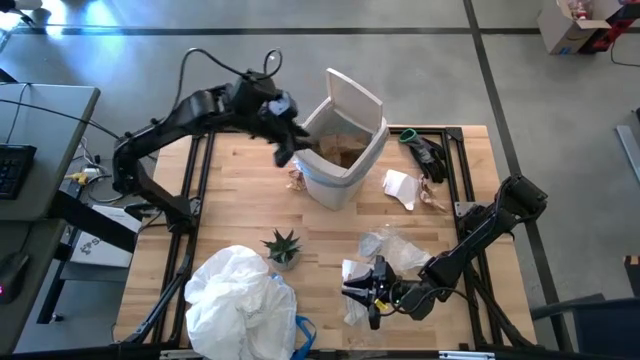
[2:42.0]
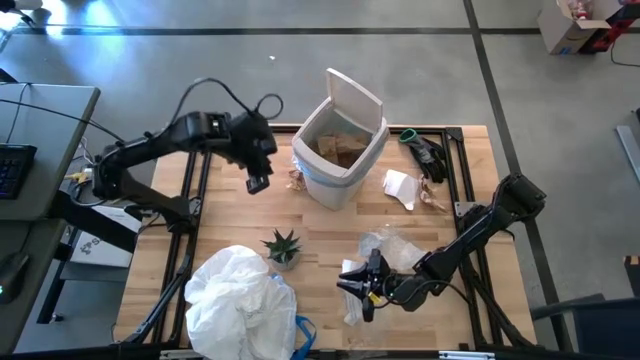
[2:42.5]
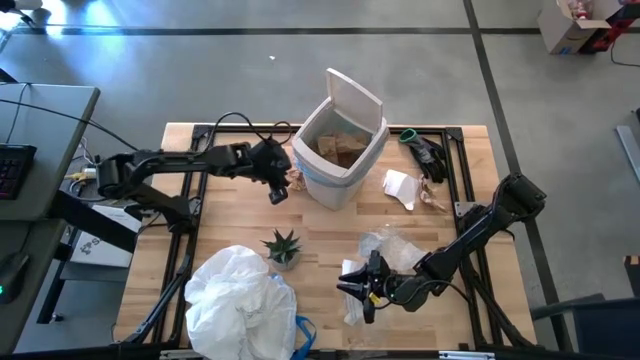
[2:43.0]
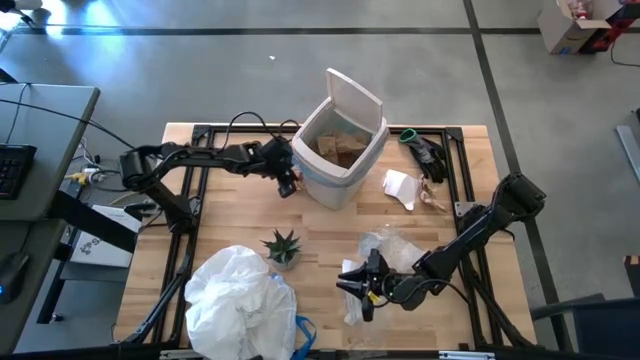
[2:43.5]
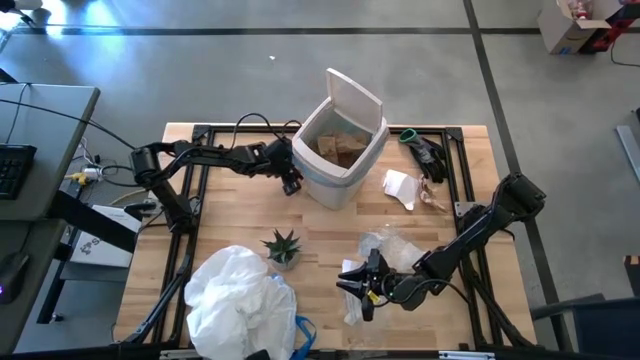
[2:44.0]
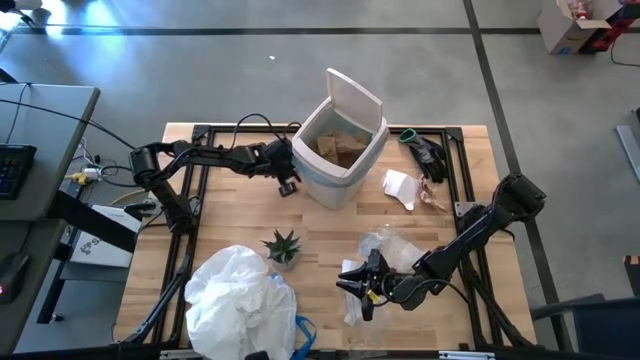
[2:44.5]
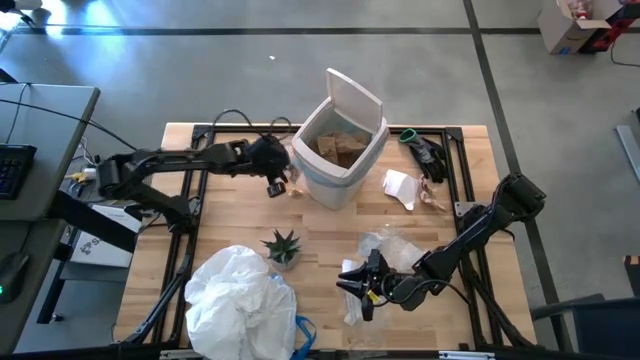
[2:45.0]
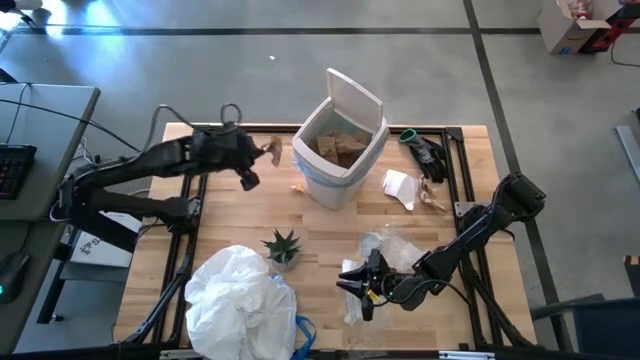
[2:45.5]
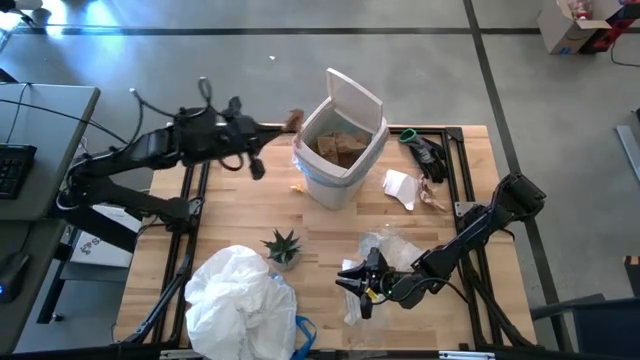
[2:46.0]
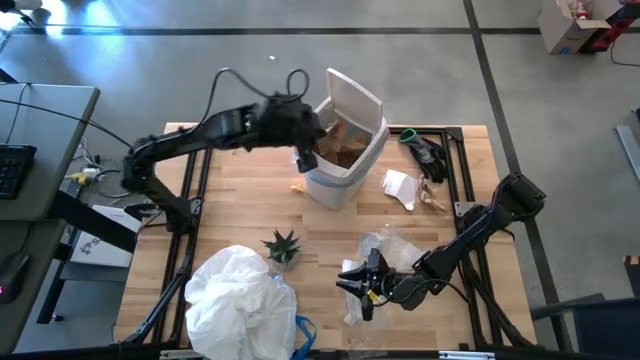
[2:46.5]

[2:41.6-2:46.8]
Task: place trash/remove bag and relplace
Put the brown napkin into the trash bin

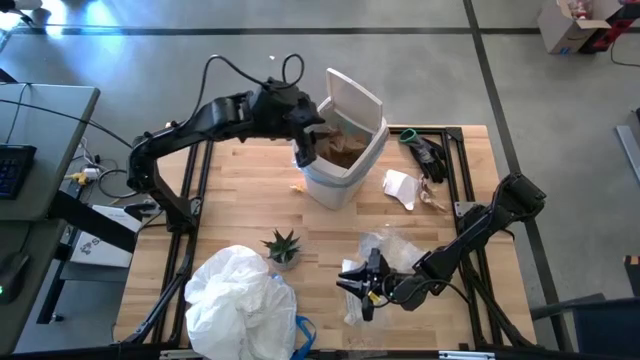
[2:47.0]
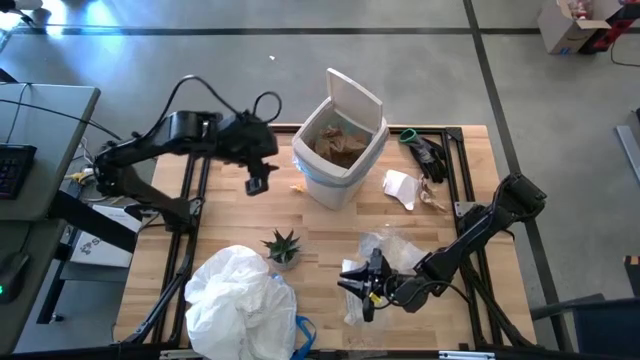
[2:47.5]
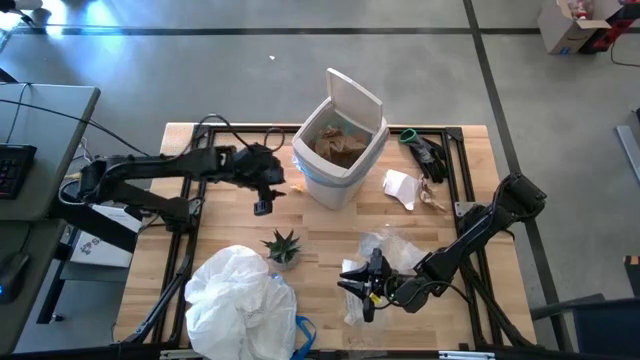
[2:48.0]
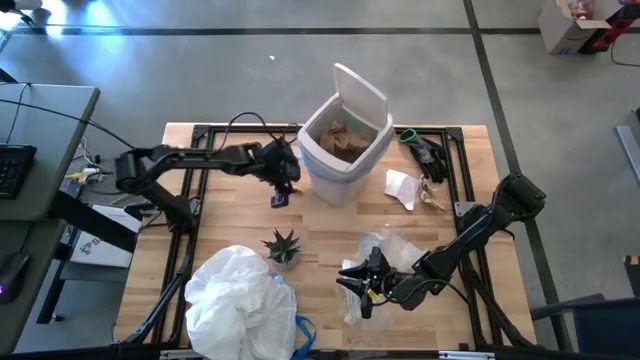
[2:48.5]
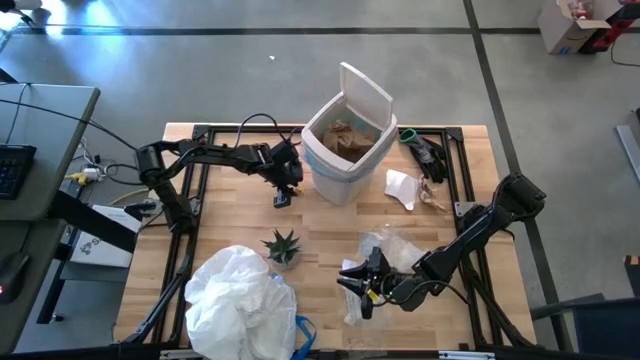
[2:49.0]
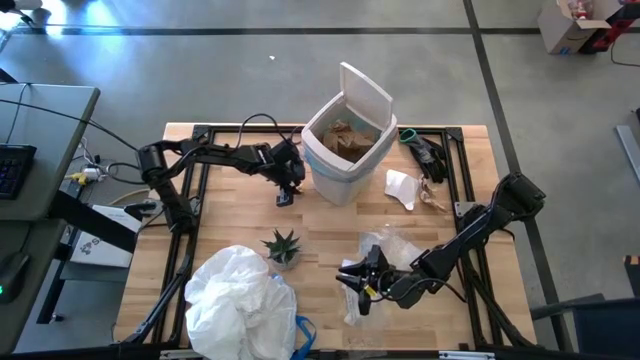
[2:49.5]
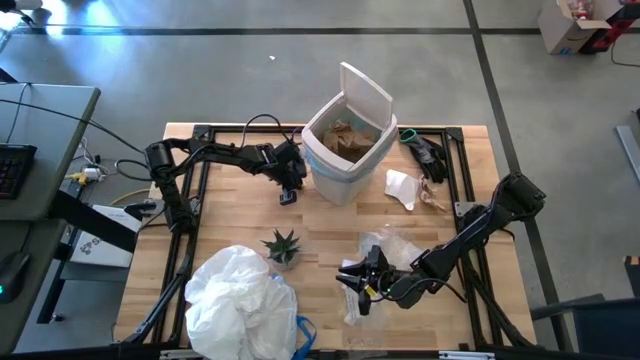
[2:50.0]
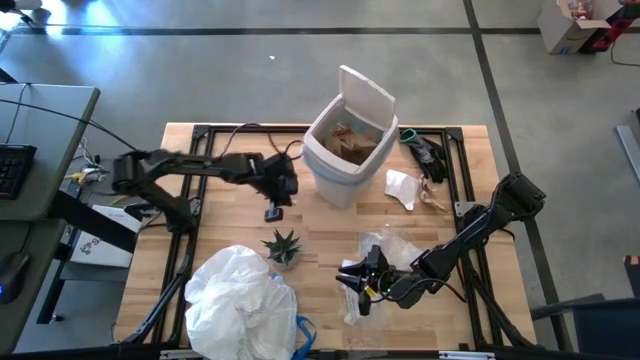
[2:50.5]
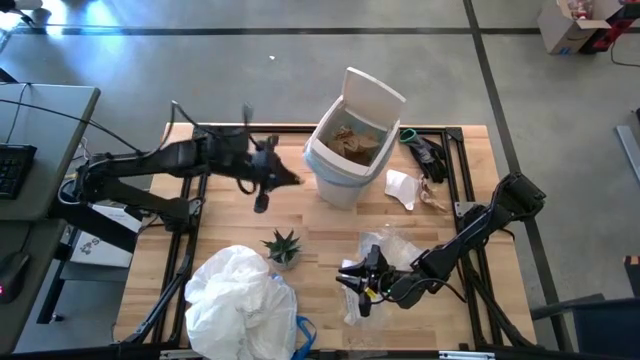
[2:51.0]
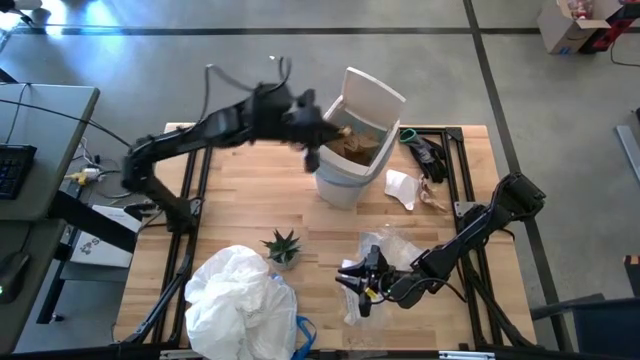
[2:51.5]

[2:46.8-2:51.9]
Put the yellow plastic wrapper into the trash bin

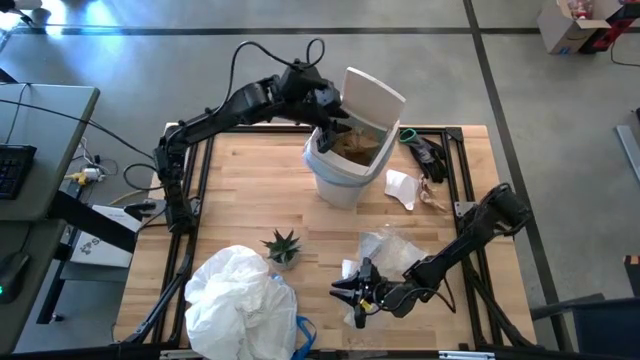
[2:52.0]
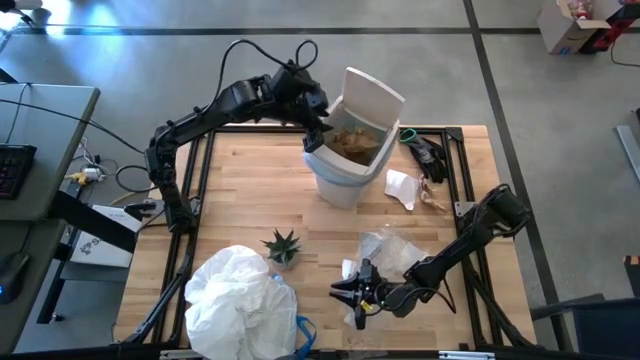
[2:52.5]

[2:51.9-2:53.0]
Adjust the trash bin

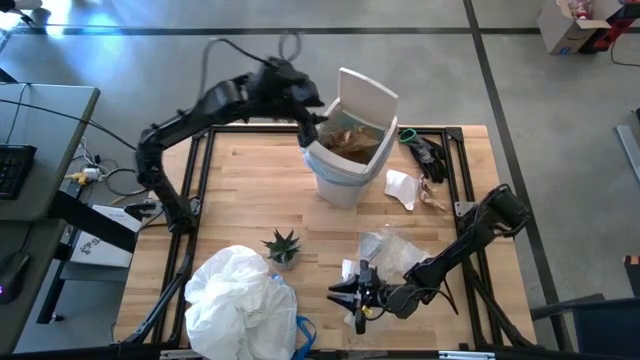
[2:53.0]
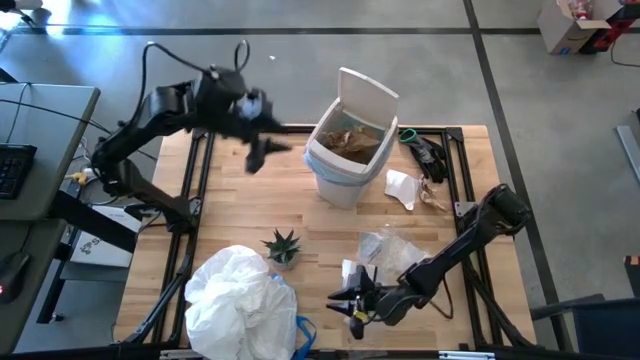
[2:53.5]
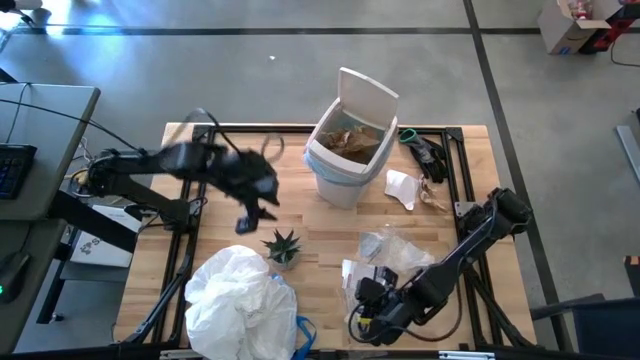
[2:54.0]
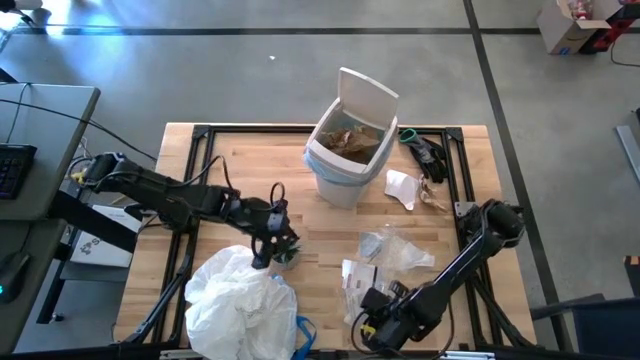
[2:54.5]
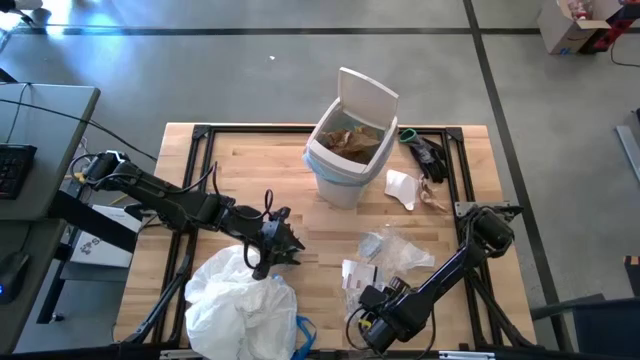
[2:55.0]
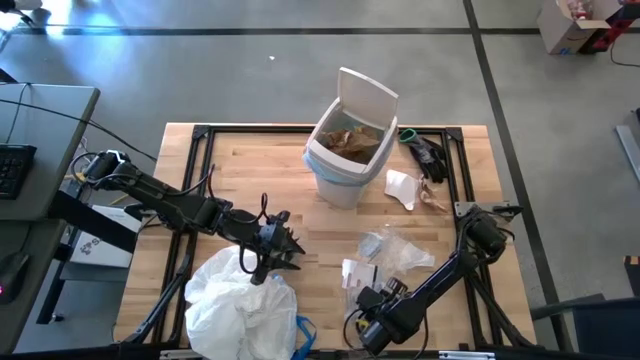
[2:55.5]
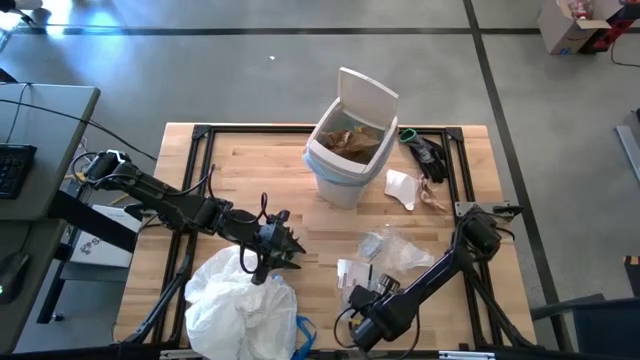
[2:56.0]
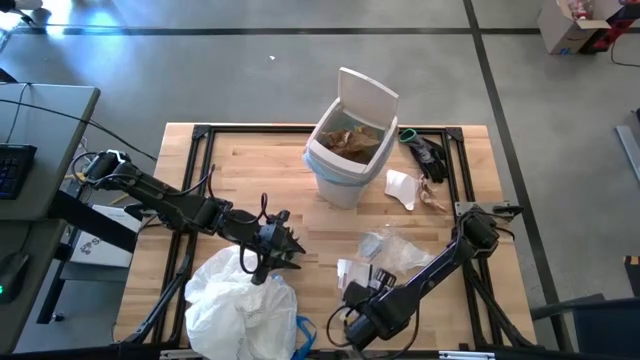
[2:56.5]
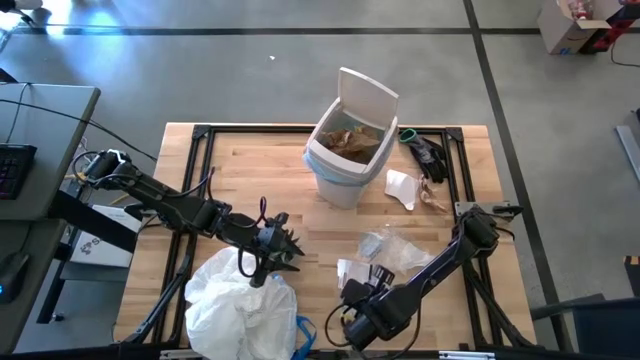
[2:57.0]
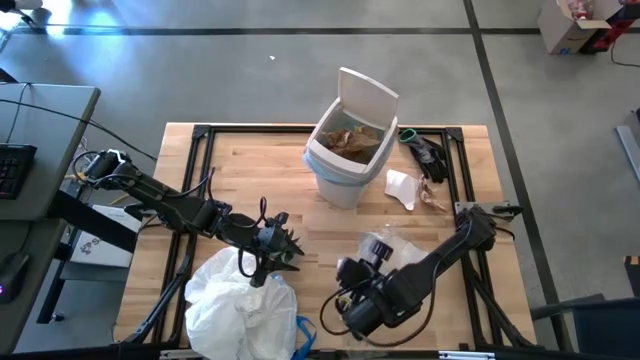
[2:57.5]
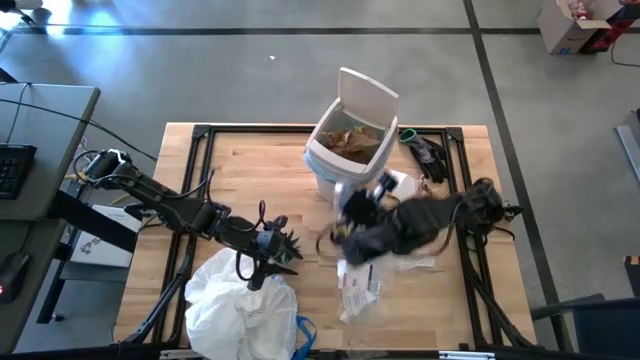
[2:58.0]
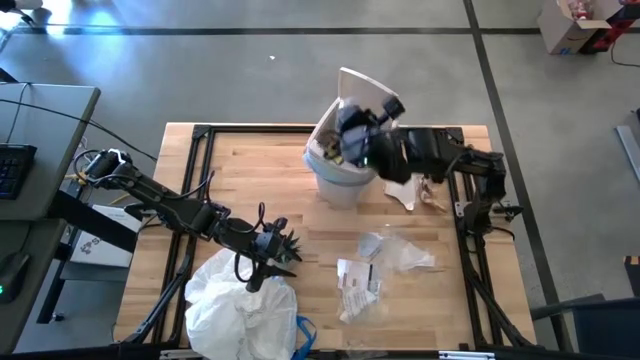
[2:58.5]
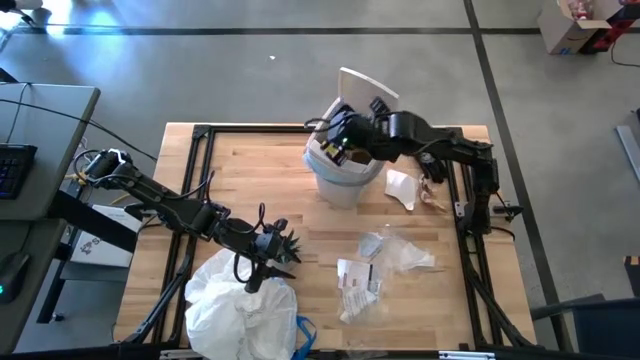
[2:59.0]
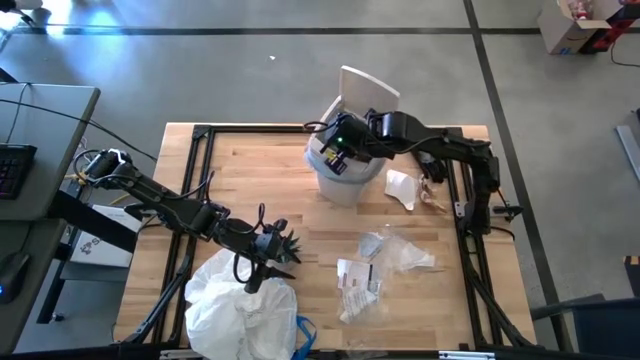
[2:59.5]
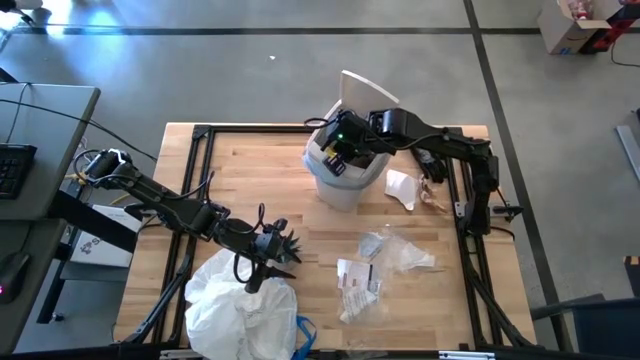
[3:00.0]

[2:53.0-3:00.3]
Put the transparent plastic into the trash bin

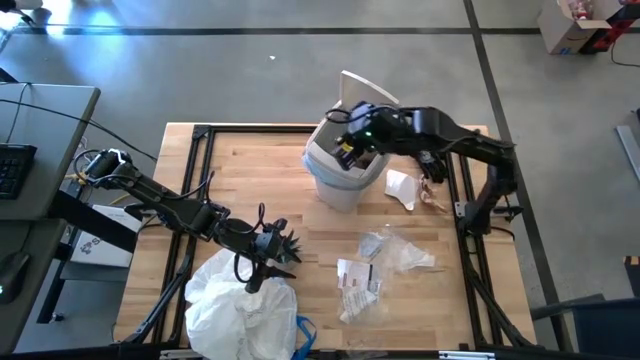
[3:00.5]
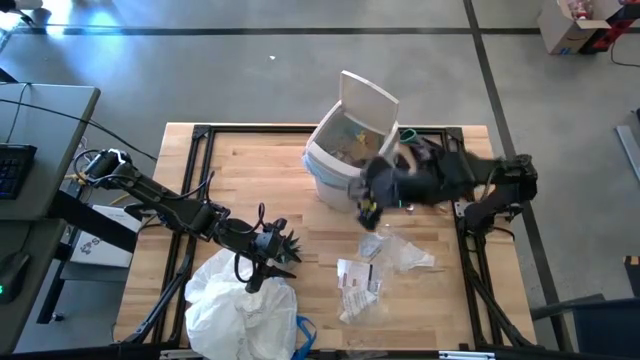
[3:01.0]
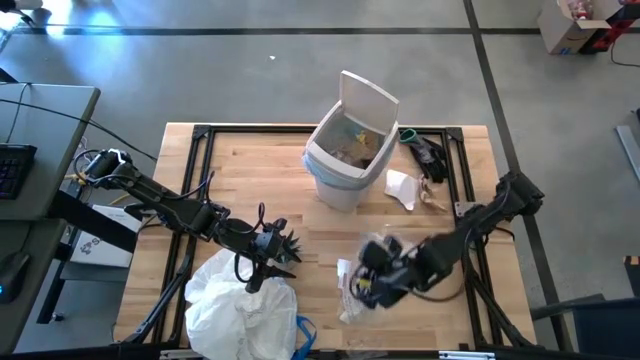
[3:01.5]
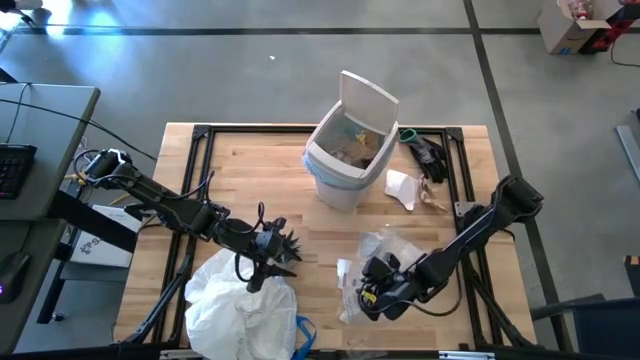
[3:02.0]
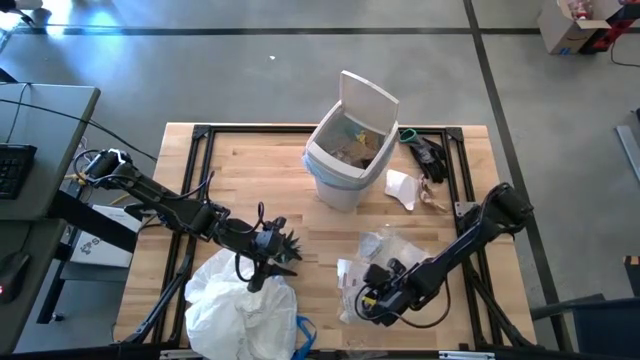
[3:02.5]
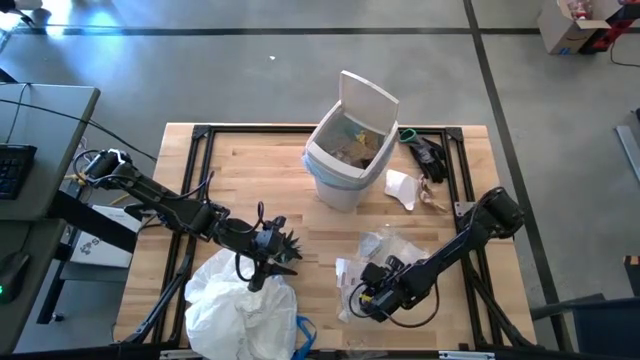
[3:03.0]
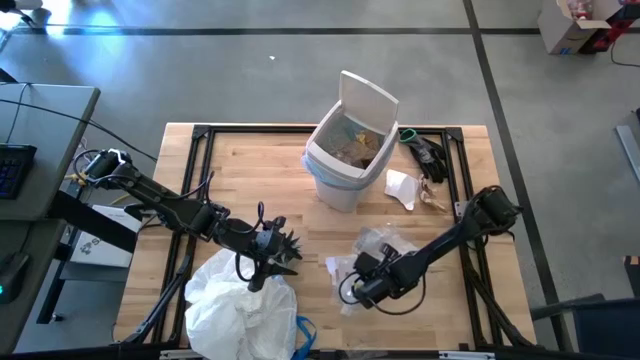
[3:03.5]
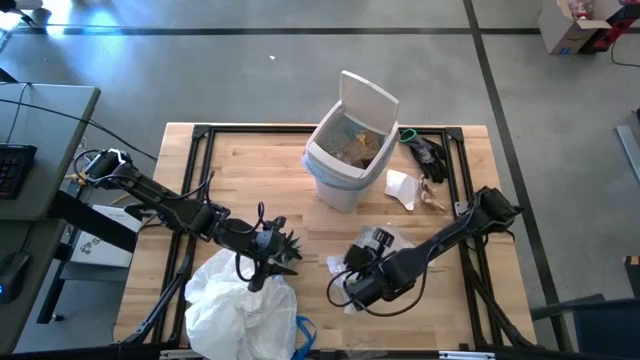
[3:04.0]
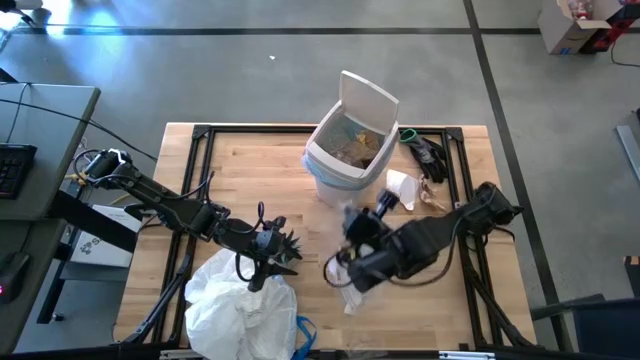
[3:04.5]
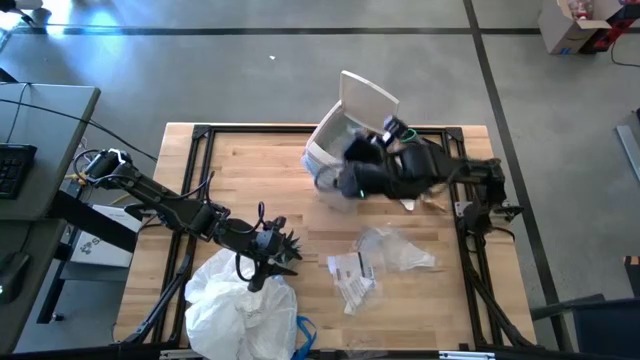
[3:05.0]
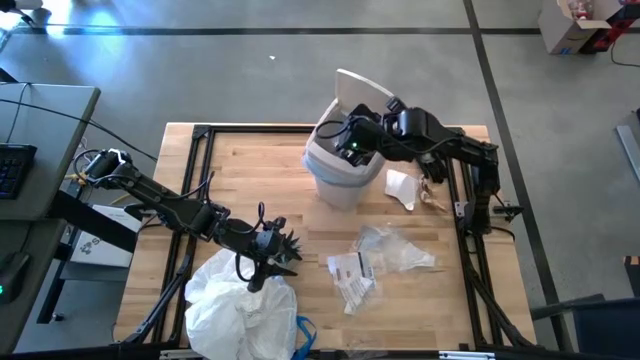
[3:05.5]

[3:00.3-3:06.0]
Put the transparent plastic into the trash bin
